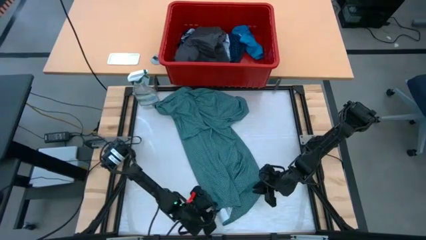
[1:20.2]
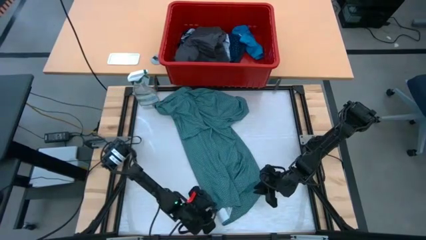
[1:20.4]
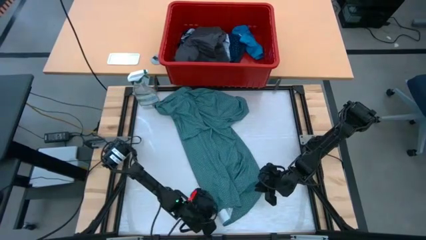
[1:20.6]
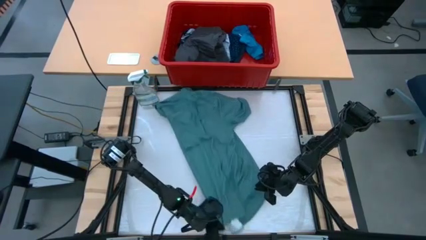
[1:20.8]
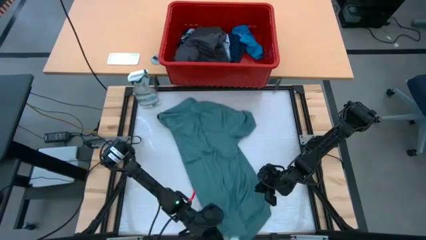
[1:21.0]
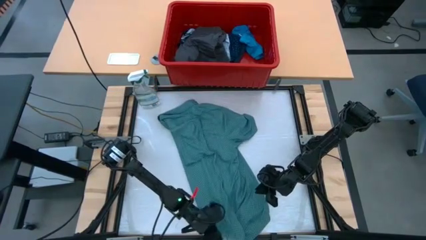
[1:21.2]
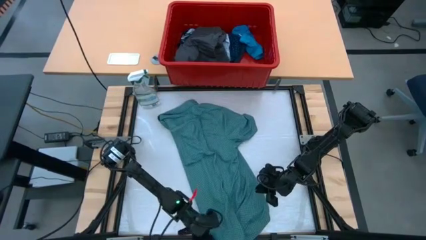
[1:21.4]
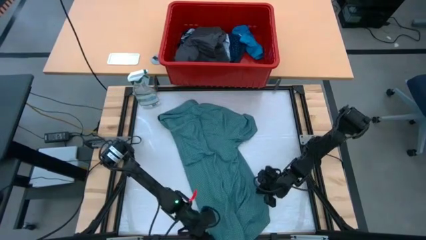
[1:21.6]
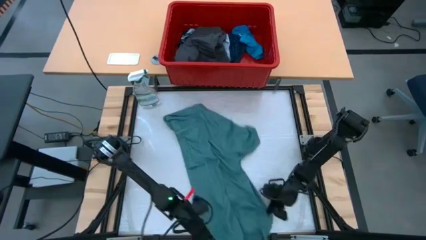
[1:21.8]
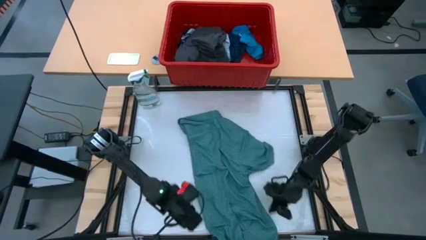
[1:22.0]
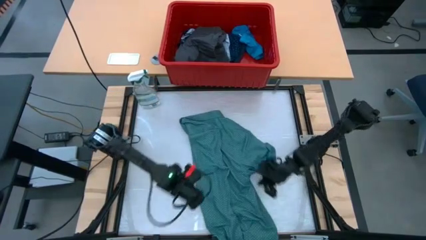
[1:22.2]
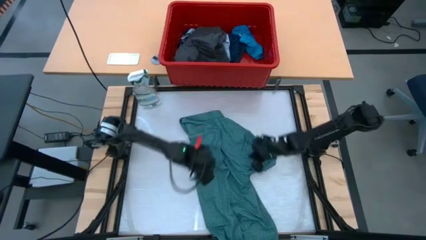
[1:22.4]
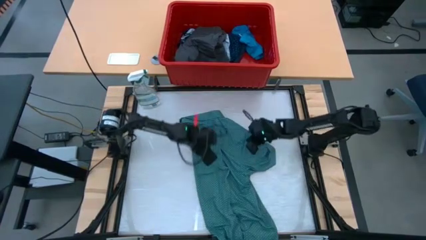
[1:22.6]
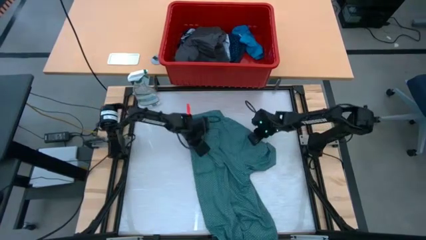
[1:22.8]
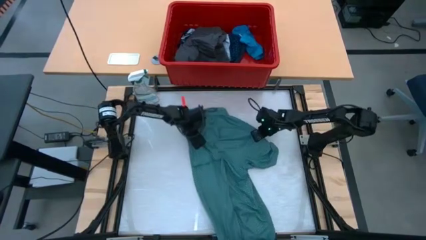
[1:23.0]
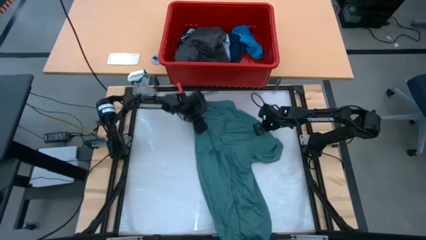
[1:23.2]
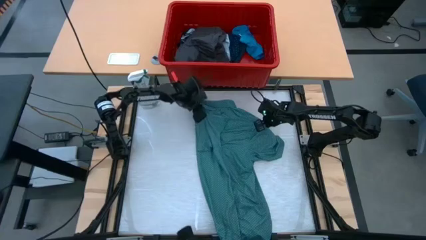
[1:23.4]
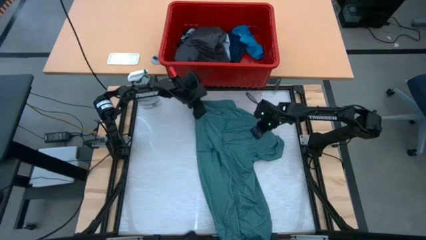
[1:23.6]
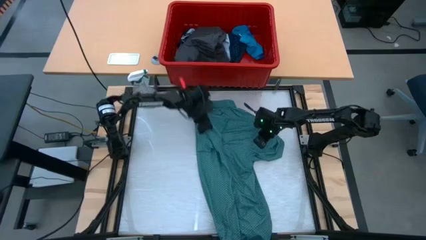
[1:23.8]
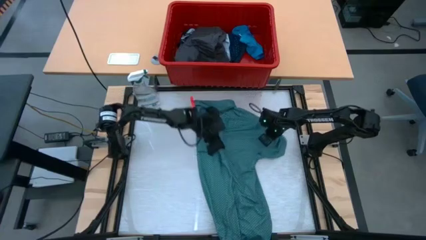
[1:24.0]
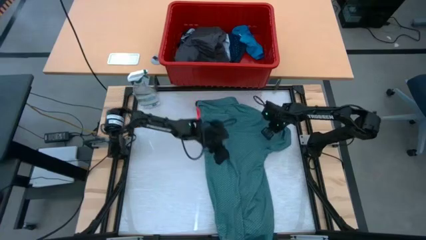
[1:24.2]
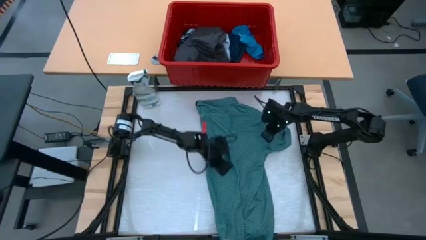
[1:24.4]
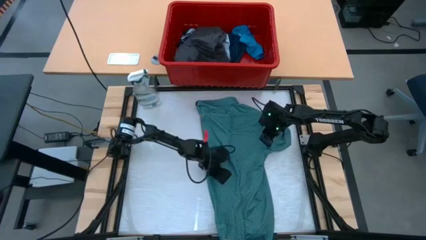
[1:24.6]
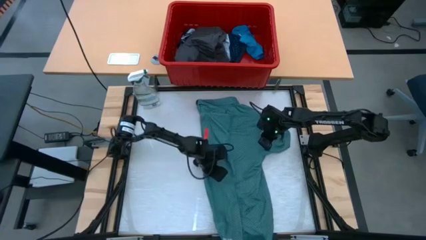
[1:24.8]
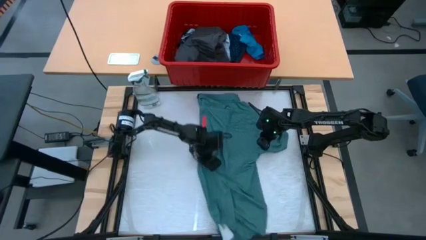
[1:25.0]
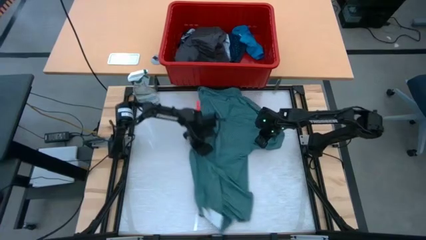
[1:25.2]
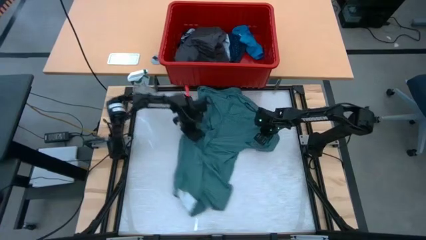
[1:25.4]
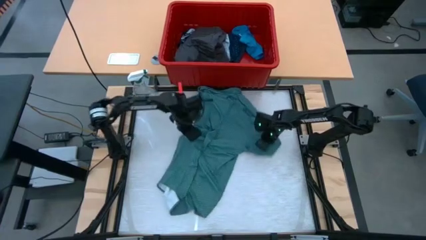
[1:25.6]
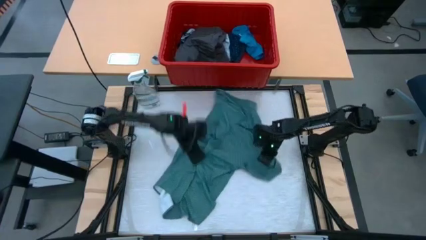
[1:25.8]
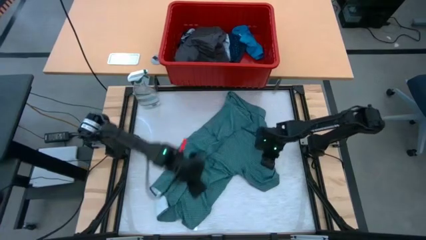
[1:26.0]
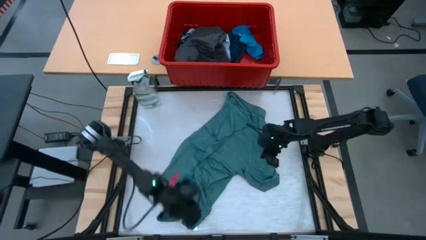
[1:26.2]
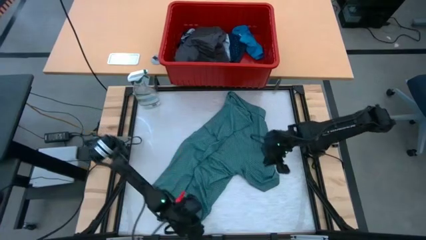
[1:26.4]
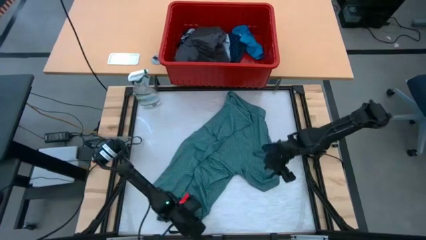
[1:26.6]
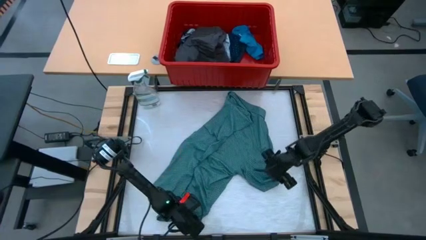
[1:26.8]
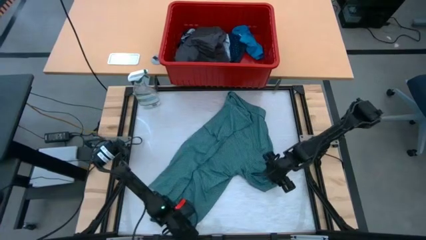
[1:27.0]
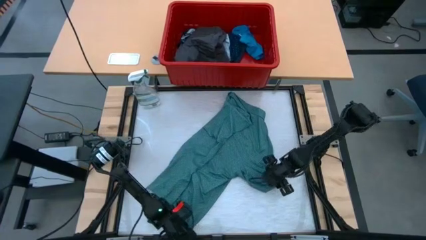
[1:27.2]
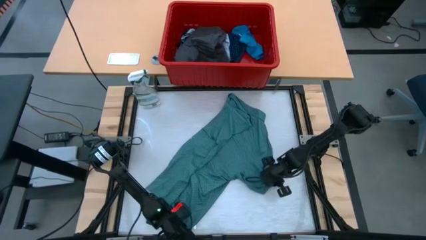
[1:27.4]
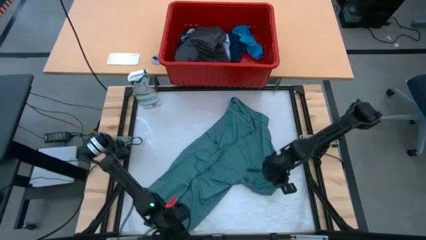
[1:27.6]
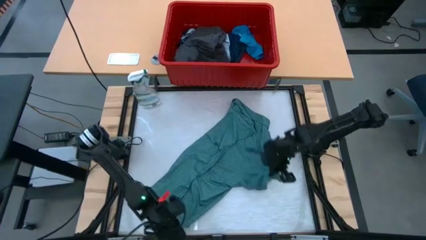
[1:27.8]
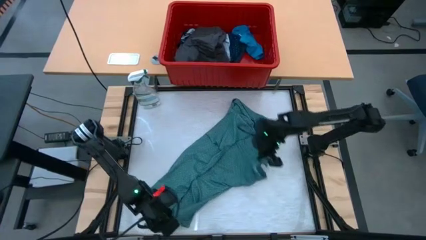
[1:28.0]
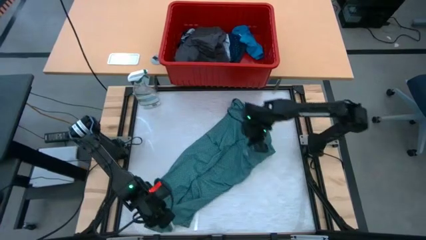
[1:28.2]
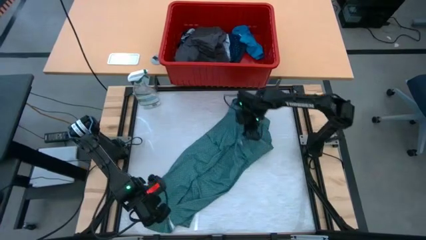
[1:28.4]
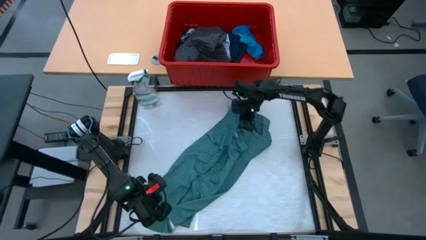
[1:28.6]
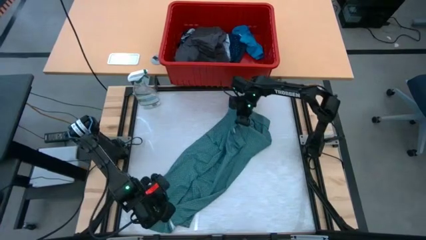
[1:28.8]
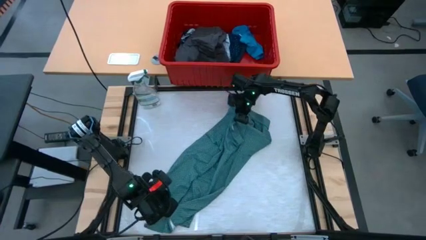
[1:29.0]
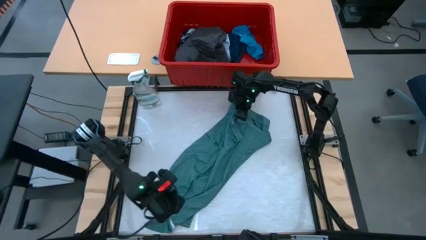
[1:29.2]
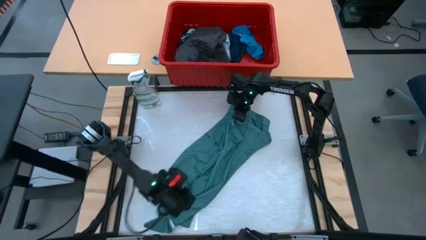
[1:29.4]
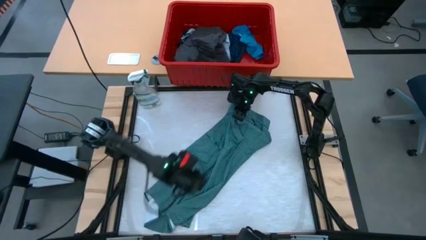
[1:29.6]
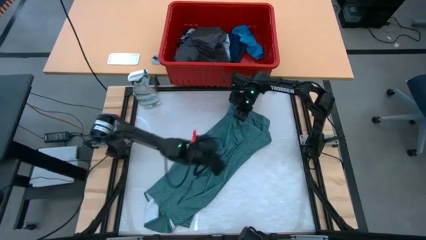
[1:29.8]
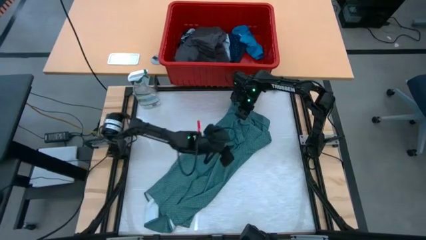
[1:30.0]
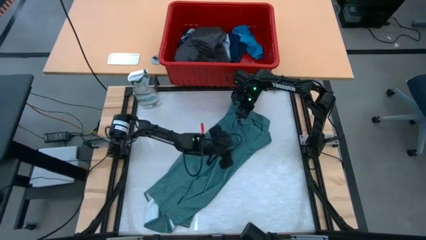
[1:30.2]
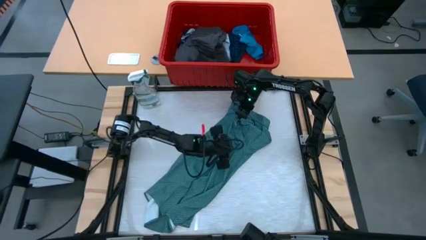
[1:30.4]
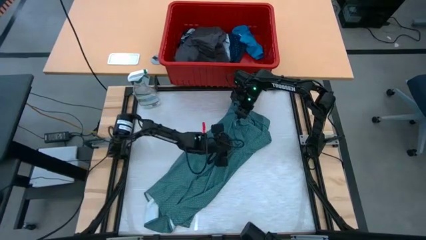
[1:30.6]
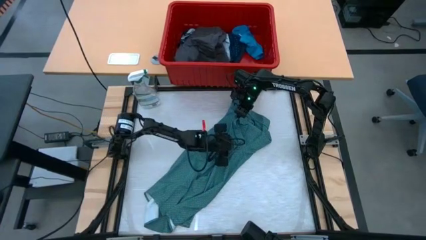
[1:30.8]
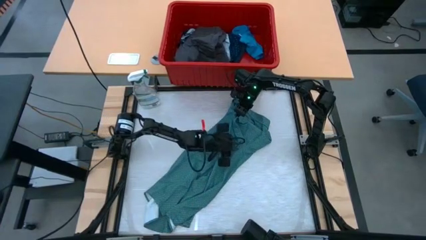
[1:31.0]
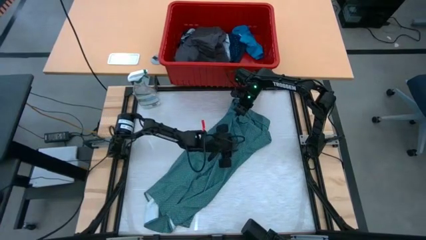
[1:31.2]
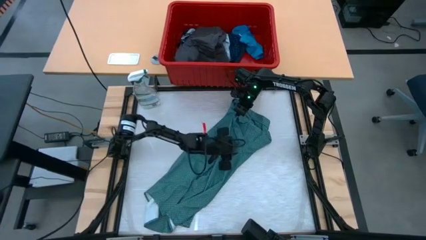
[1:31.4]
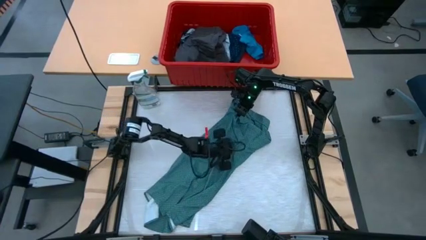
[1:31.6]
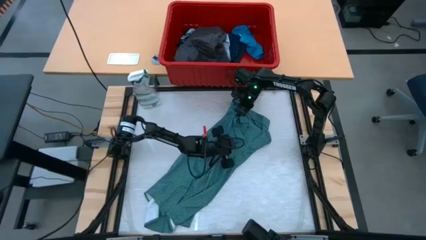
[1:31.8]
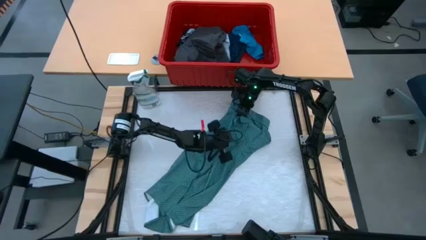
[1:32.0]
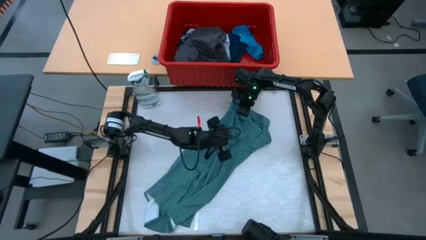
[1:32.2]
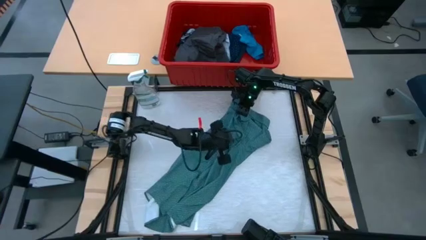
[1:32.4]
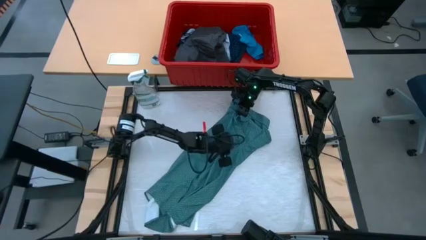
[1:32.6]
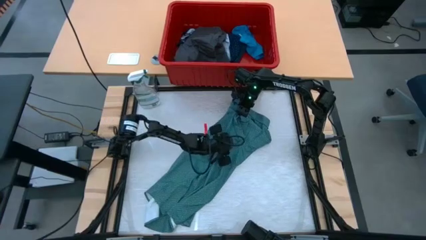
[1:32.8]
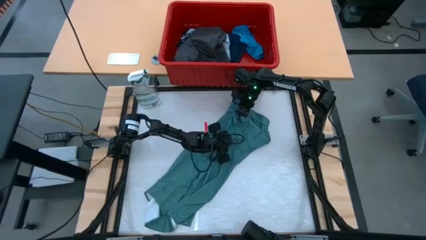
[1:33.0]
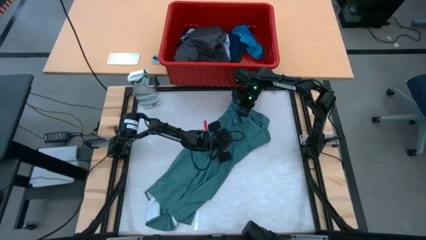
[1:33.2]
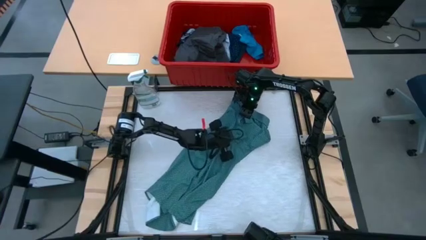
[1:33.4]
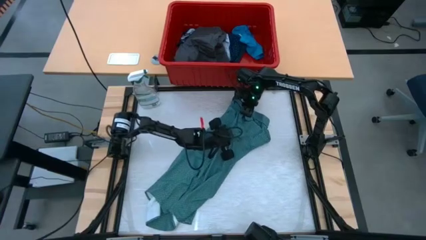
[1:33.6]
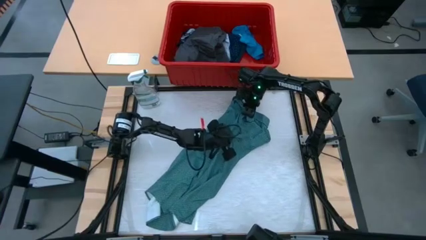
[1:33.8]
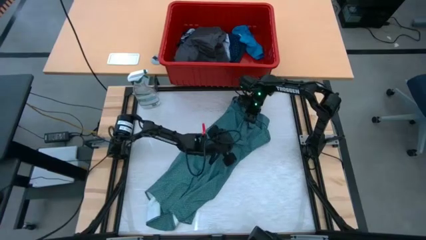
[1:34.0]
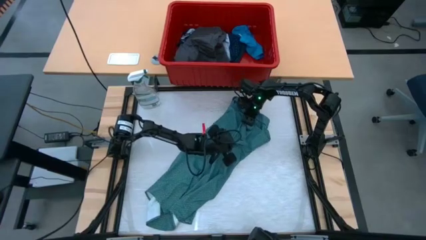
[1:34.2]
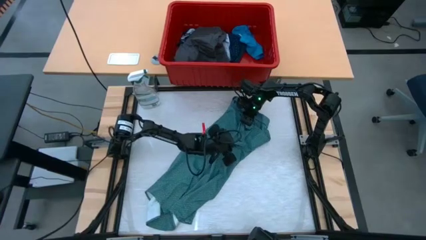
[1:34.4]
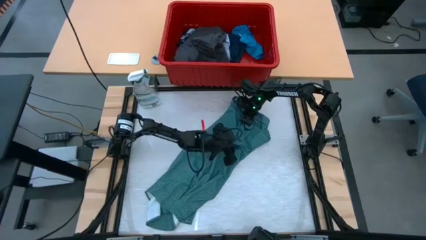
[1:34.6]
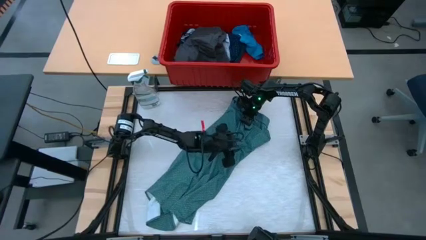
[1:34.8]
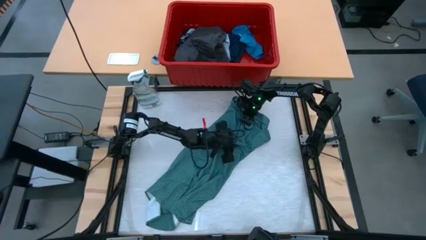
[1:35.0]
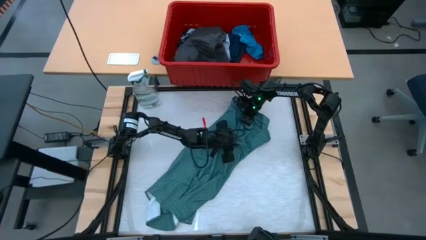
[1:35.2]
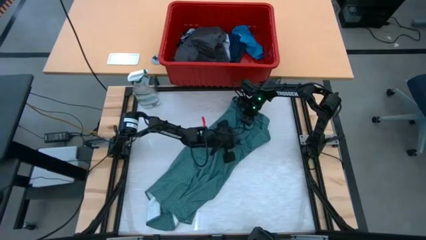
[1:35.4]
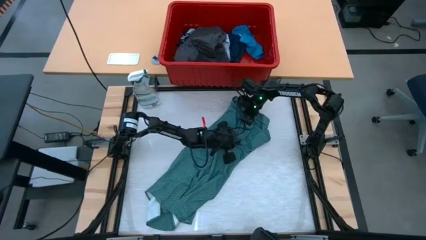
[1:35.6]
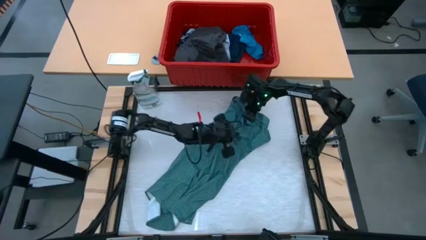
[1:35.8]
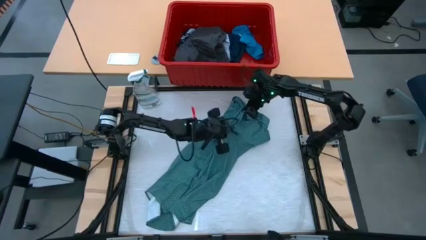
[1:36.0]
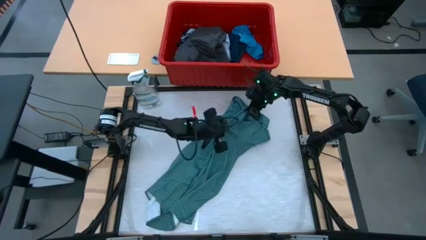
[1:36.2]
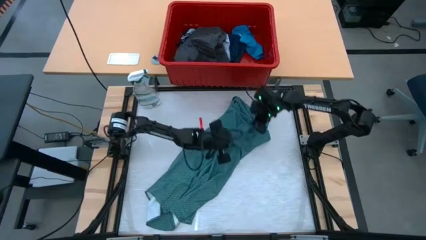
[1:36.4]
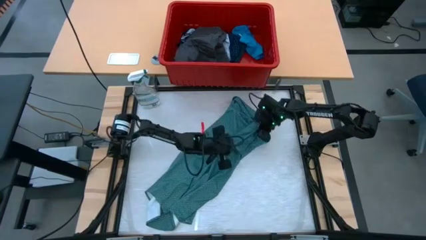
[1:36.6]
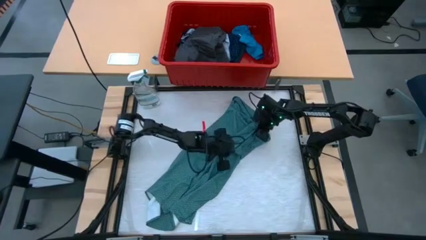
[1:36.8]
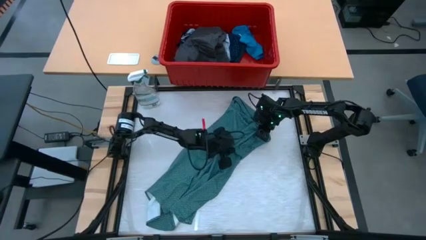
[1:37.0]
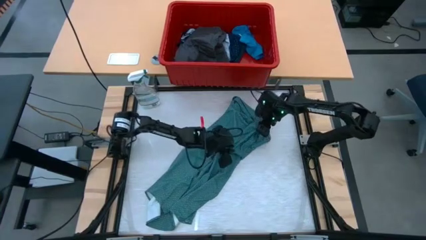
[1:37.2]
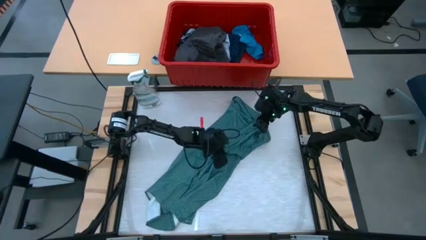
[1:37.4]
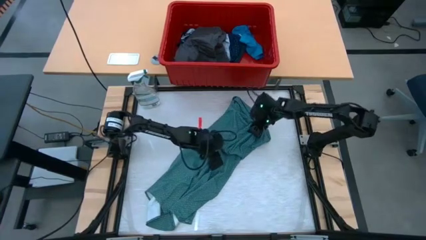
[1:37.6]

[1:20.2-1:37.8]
Task: Fold laundry
Fold the green shirt
